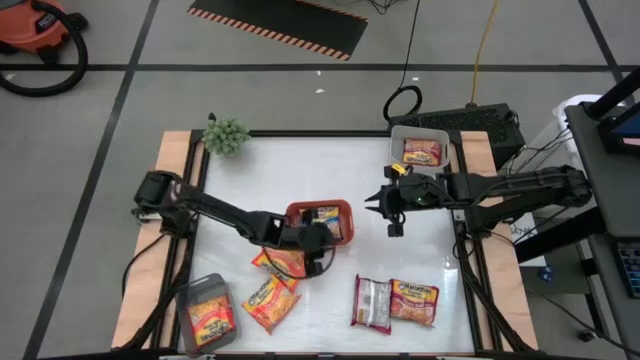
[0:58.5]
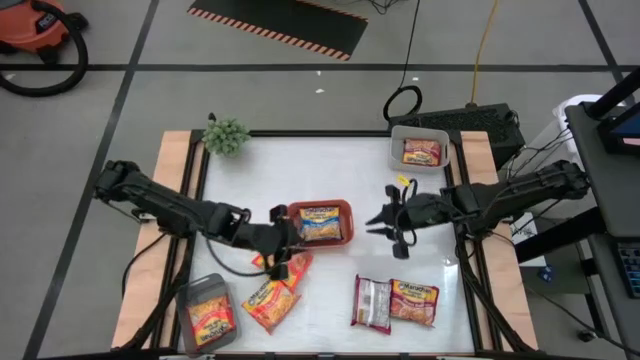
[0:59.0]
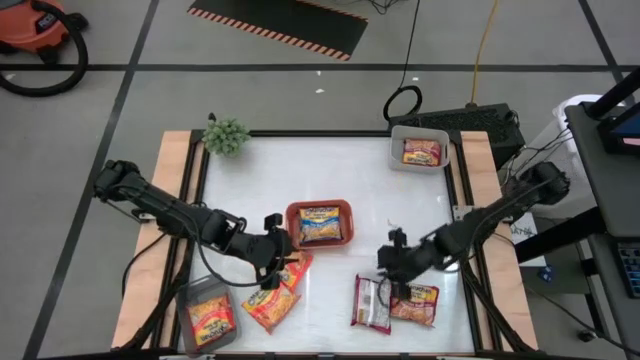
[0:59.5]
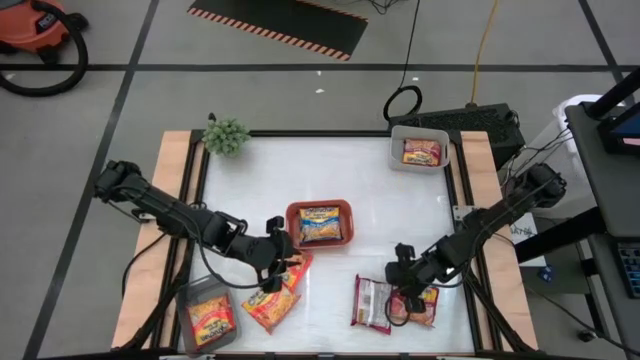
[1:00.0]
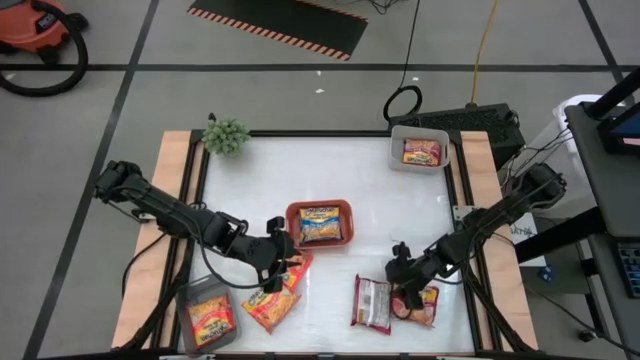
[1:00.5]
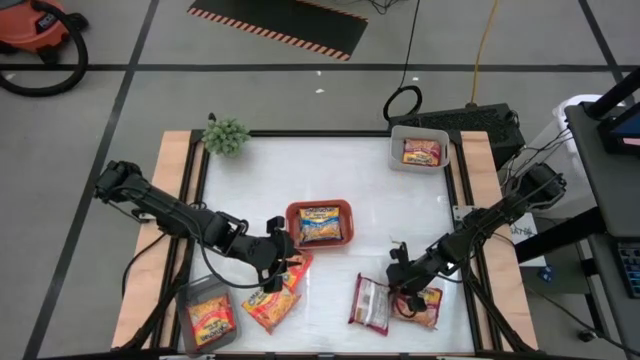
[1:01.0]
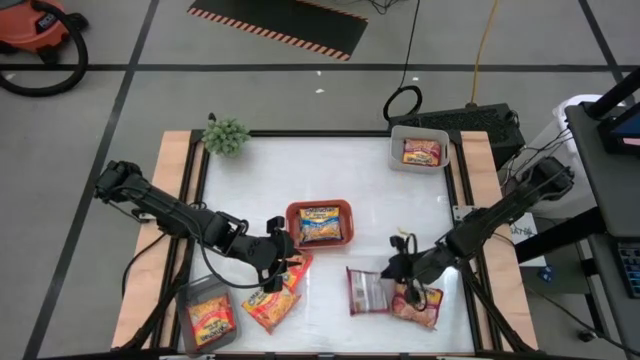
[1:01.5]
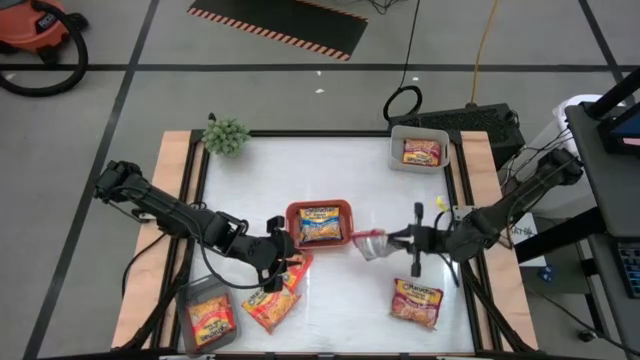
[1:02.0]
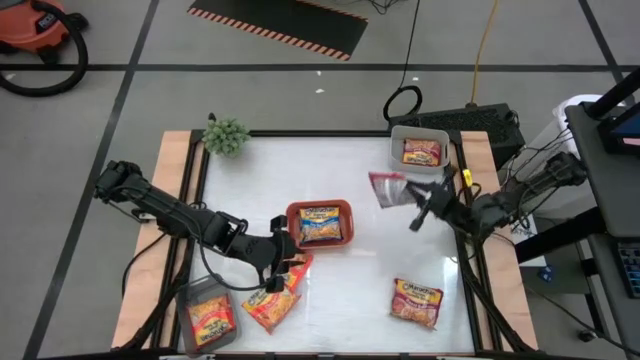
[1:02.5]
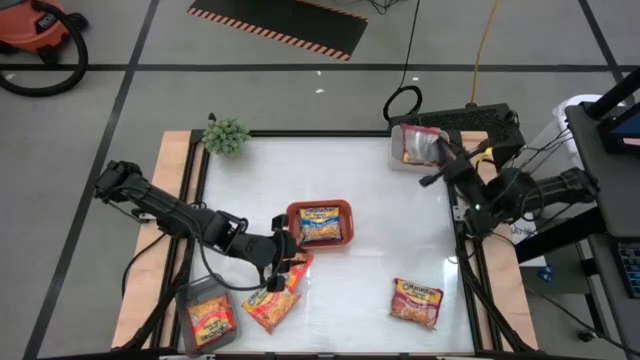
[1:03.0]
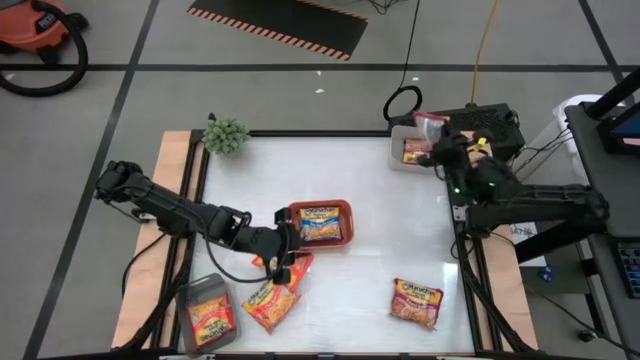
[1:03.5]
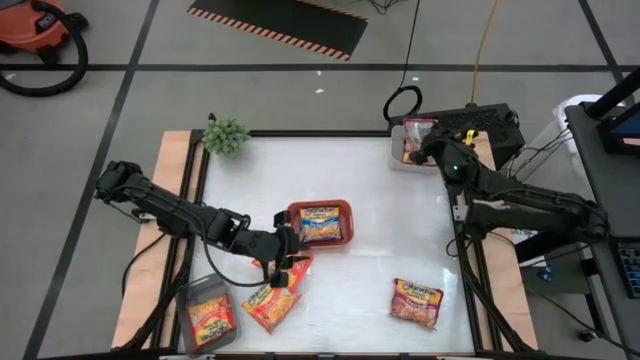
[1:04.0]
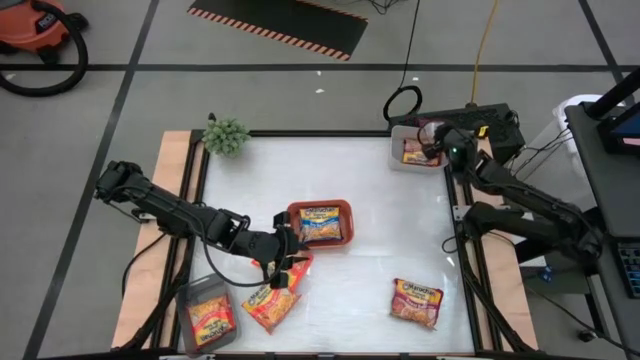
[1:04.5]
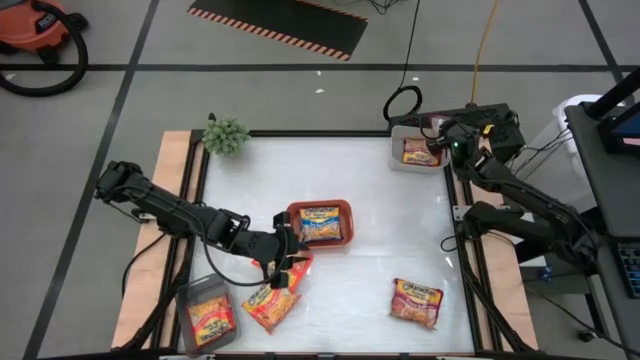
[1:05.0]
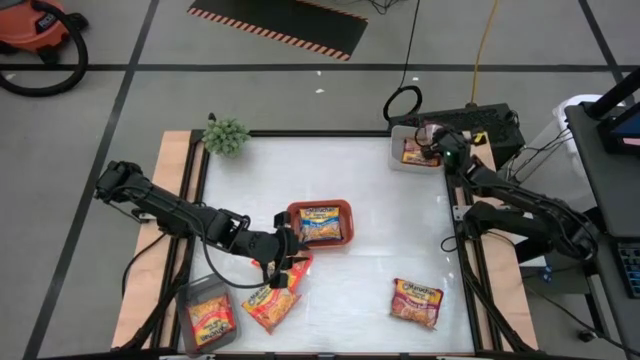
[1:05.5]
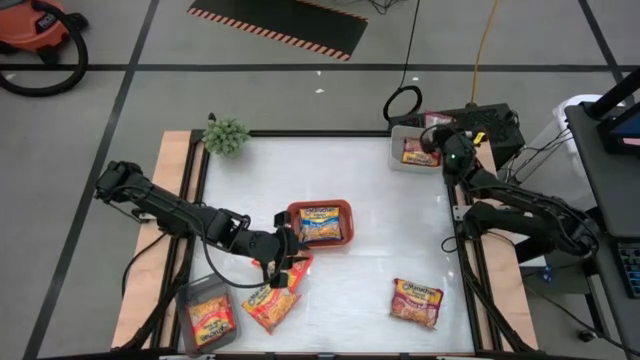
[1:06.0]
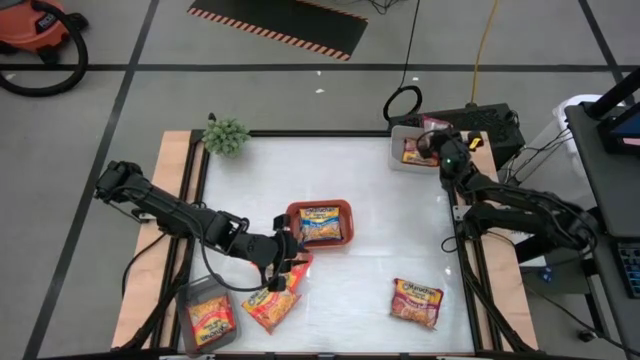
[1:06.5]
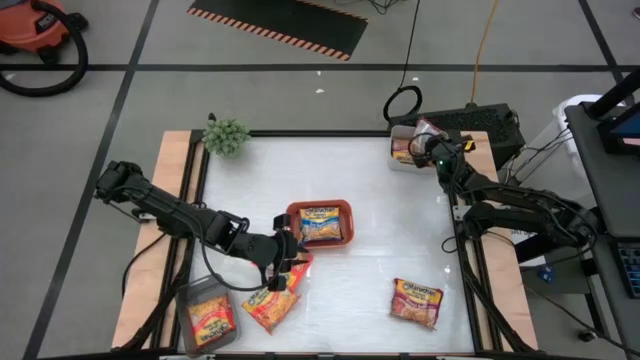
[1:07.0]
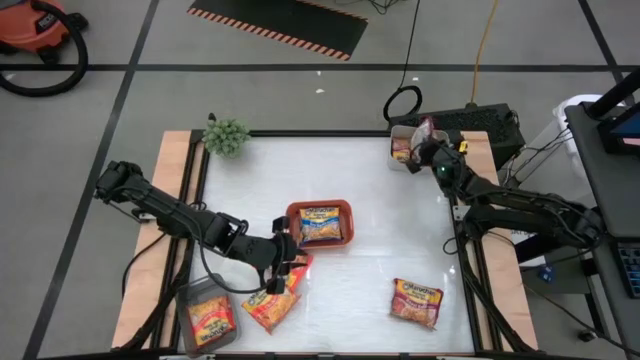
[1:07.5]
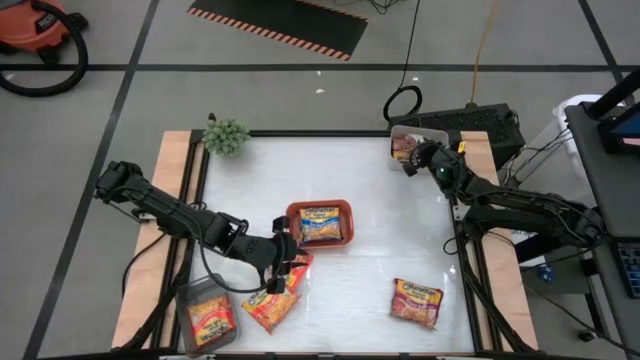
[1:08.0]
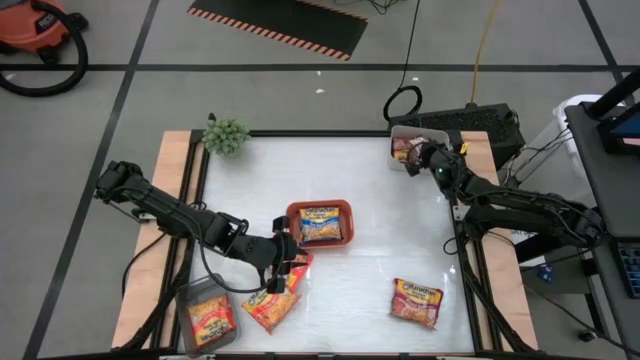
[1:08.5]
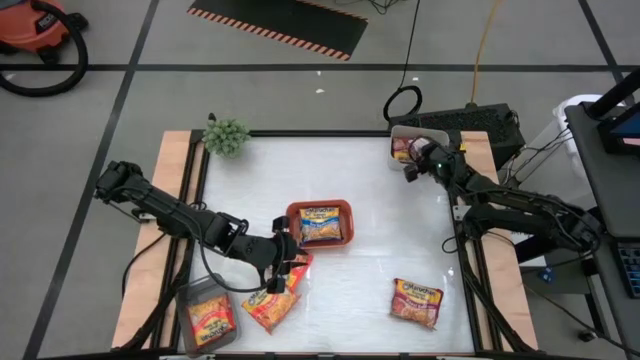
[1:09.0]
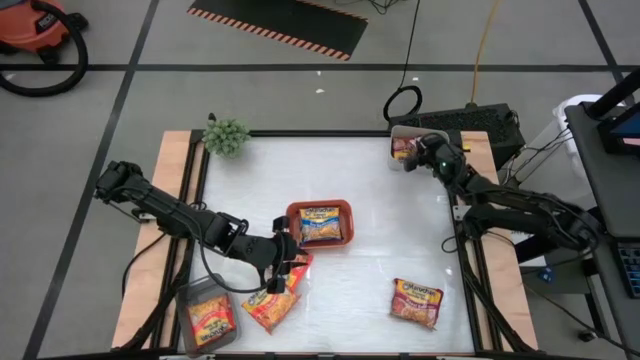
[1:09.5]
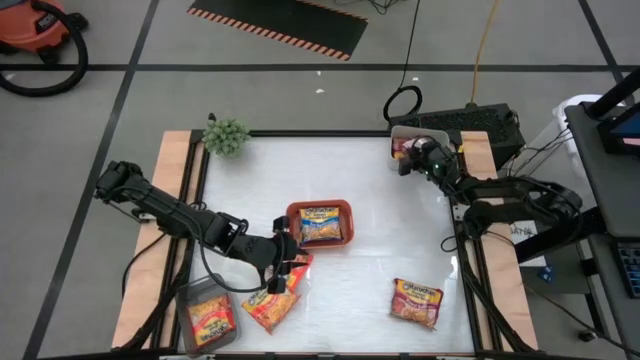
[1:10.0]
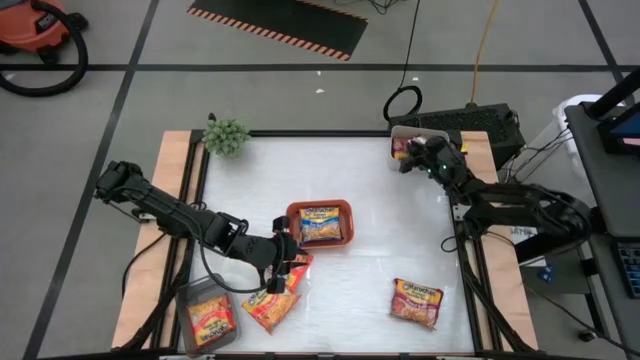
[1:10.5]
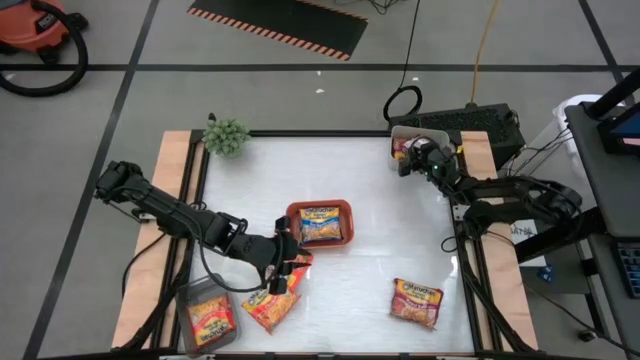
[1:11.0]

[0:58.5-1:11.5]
Task: Sort Maruchan noodles
Put the left red noodle pack into the gray bin

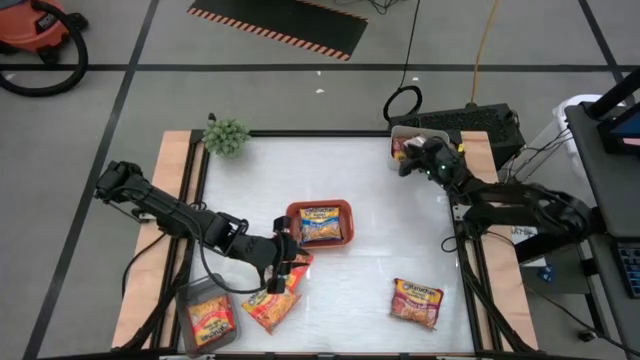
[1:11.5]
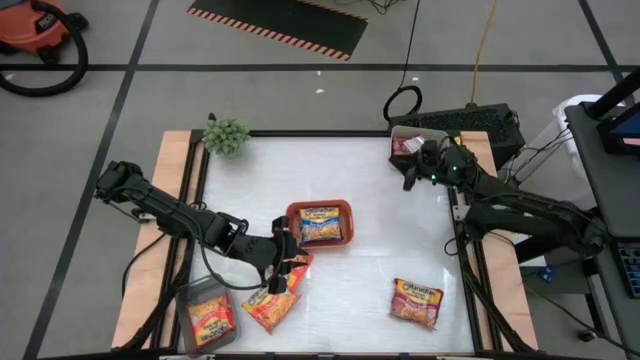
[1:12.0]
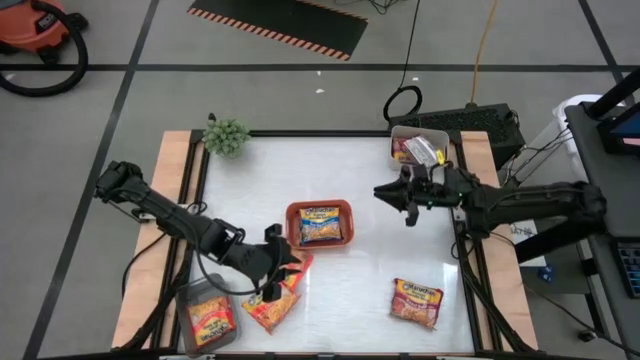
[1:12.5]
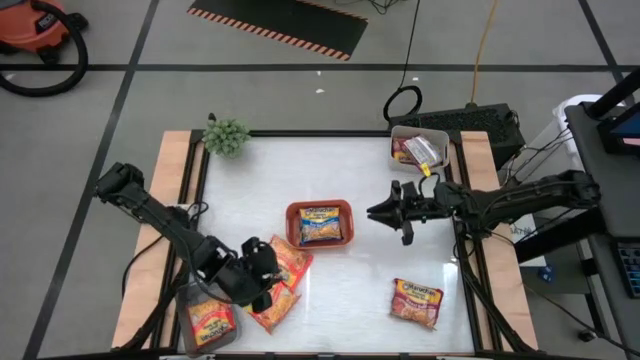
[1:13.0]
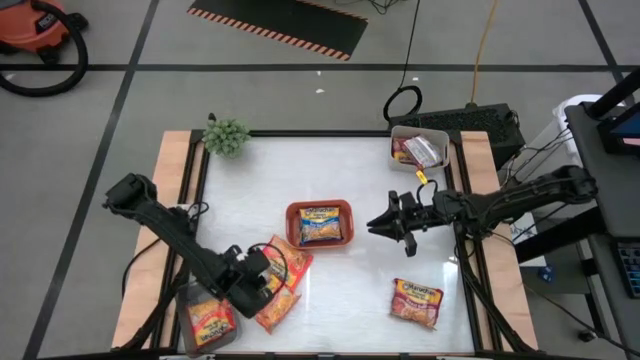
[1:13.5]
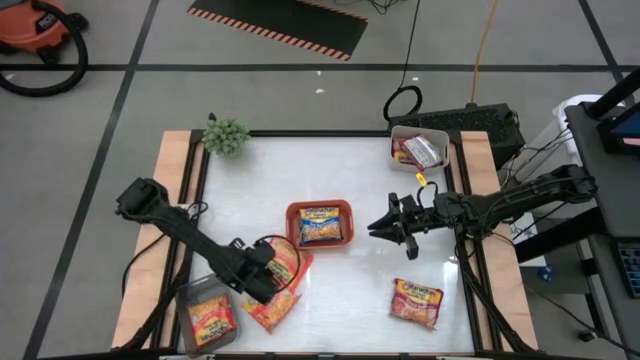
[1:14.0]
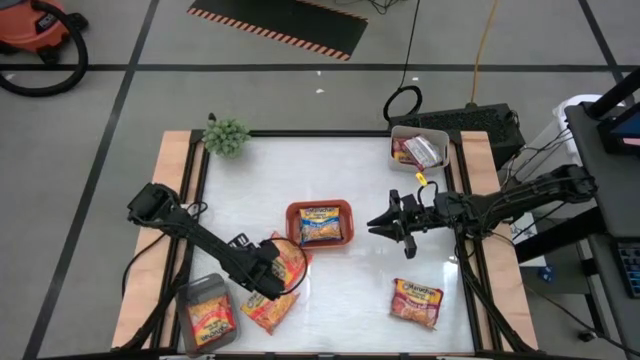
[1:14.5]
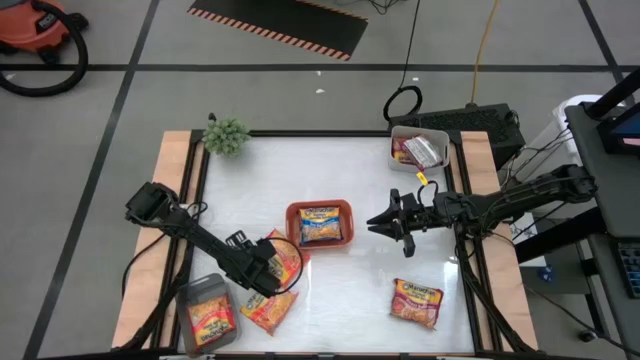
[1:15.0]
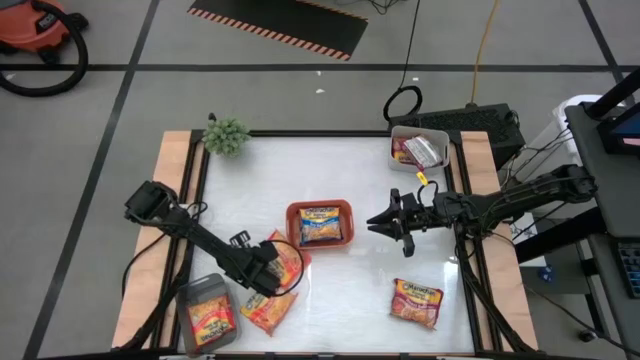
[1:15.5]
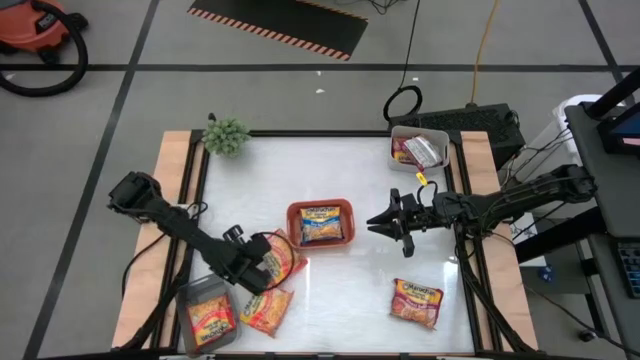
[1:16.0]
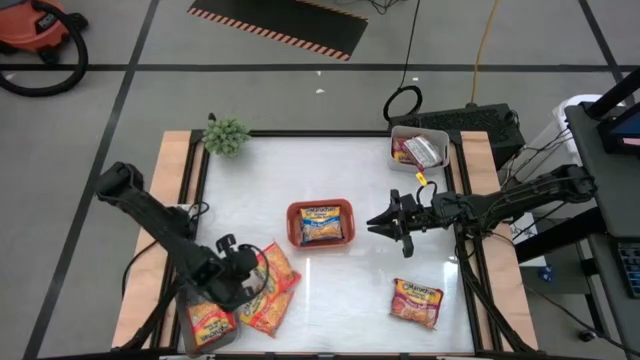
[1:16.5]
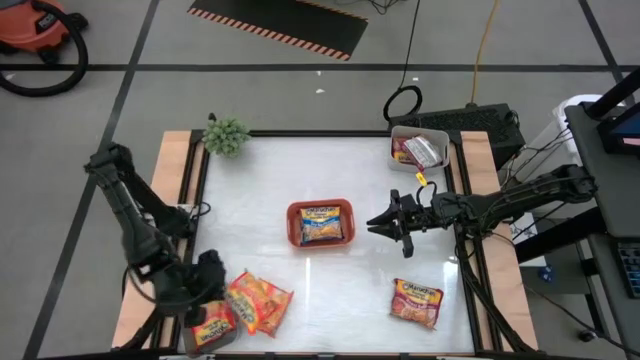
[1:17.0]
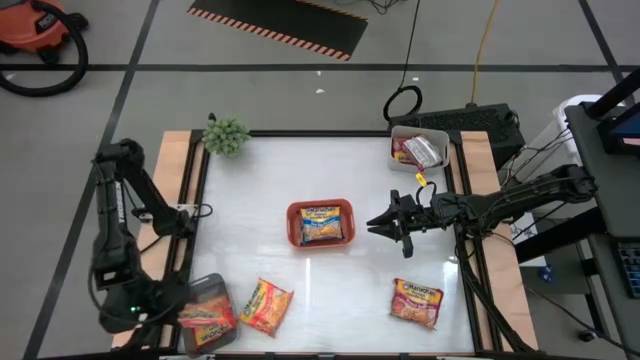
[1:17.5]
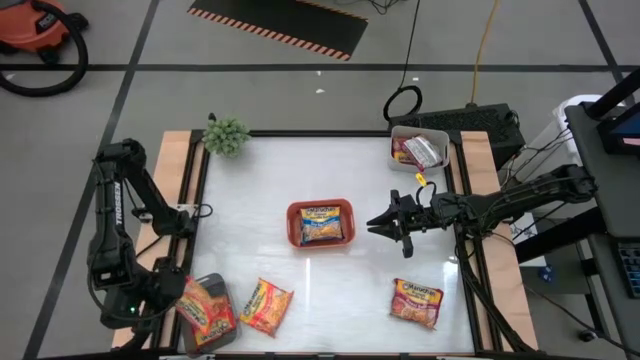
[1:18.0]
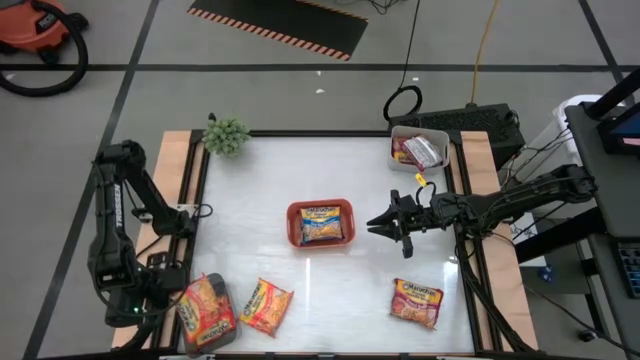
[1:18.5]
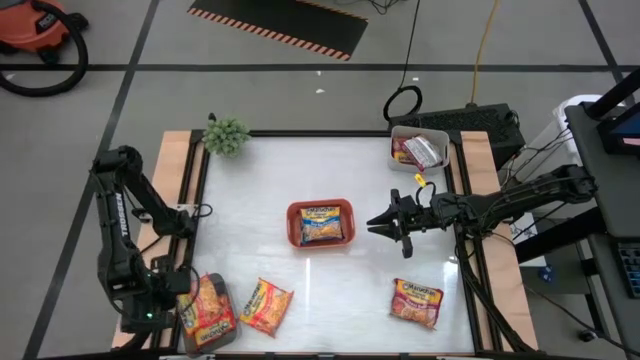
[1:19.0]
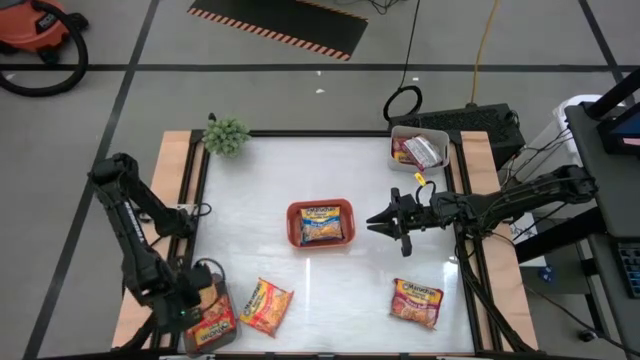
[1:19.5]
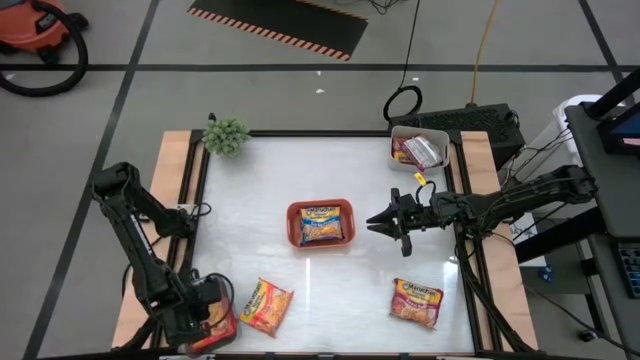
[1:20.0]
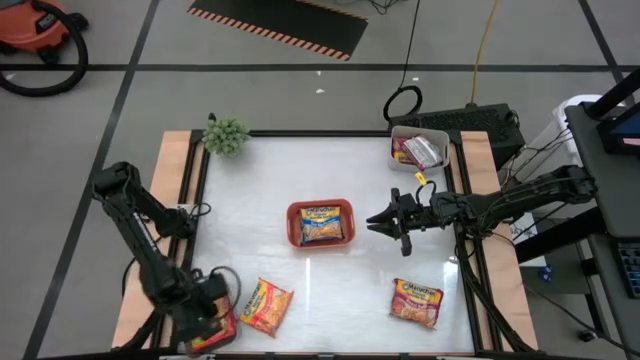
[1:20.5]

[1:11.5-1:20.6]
Put the top orange noodle pack into the transparent black bin
